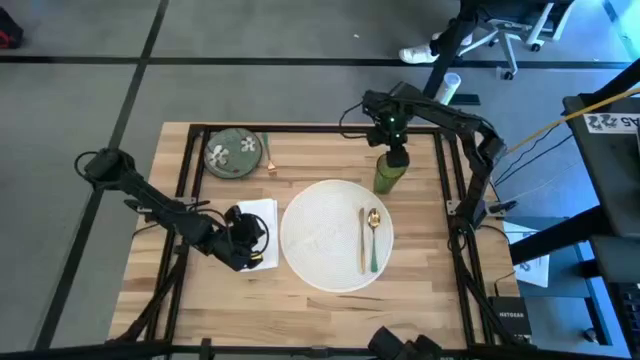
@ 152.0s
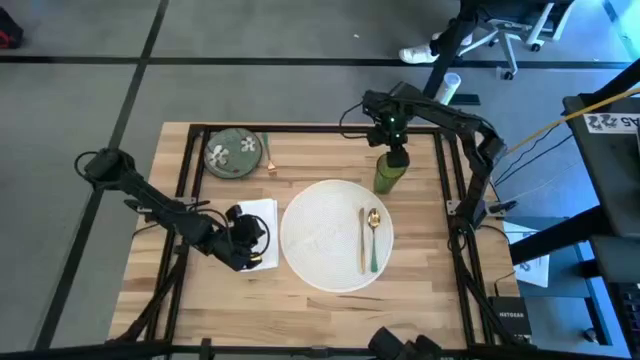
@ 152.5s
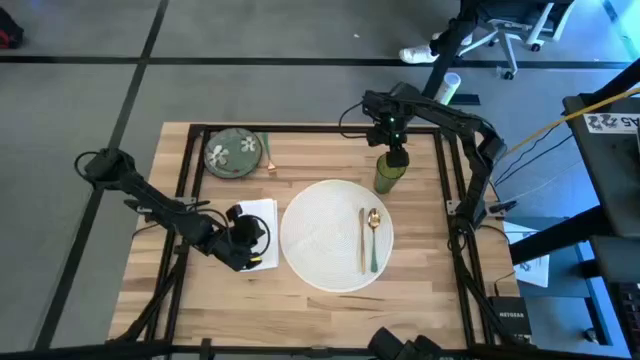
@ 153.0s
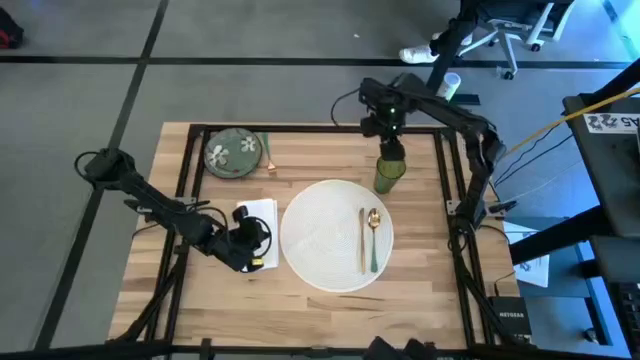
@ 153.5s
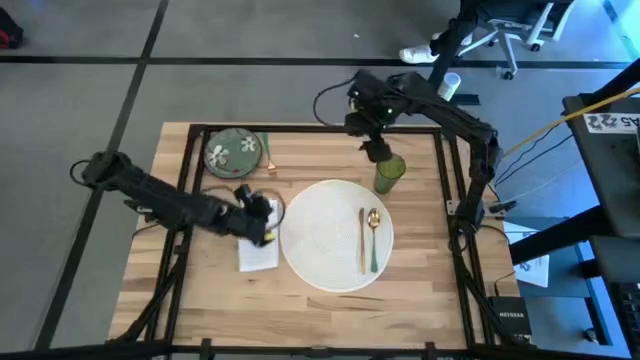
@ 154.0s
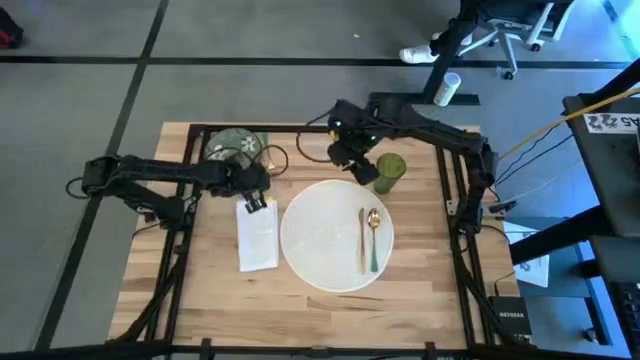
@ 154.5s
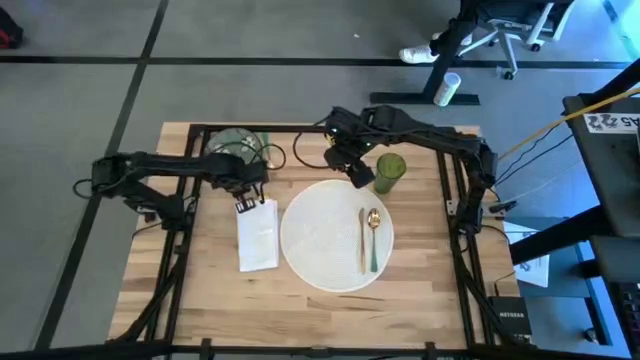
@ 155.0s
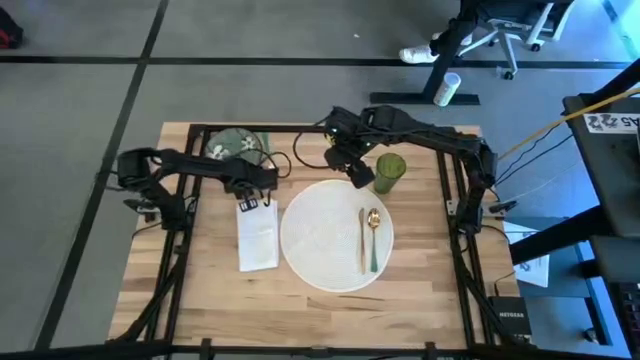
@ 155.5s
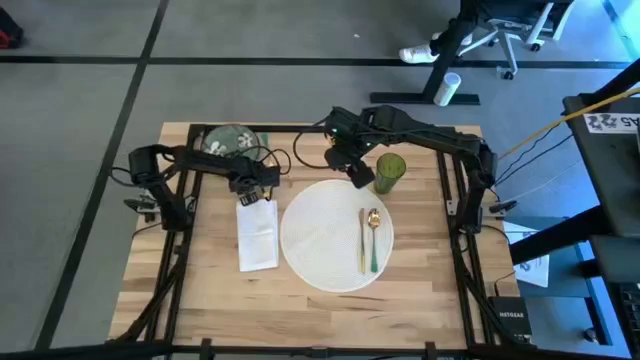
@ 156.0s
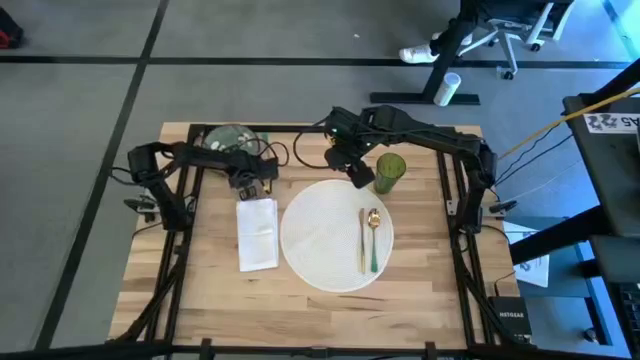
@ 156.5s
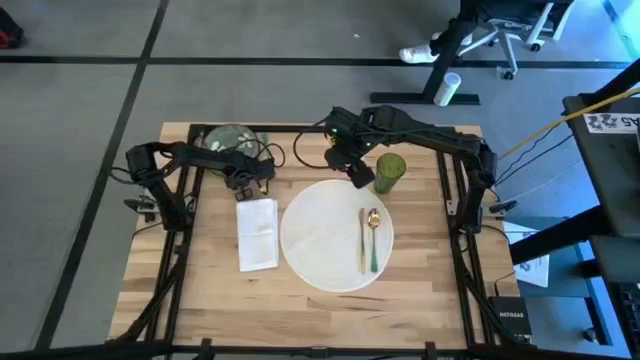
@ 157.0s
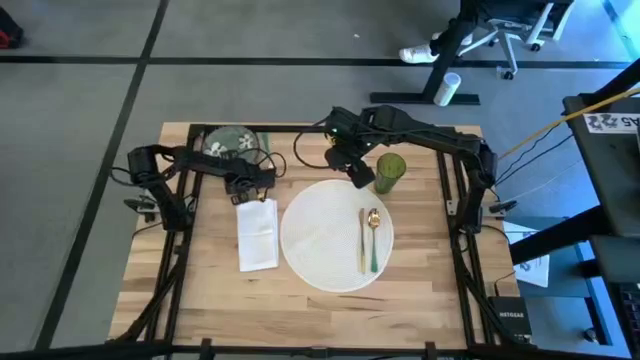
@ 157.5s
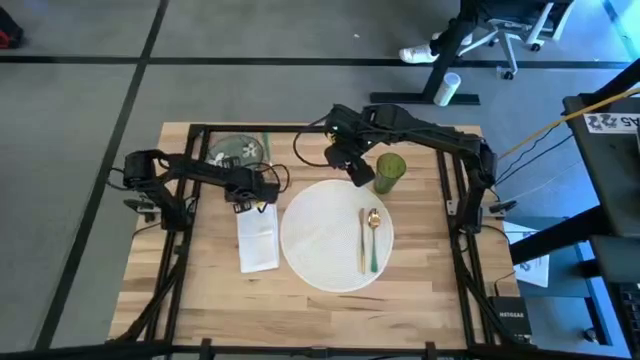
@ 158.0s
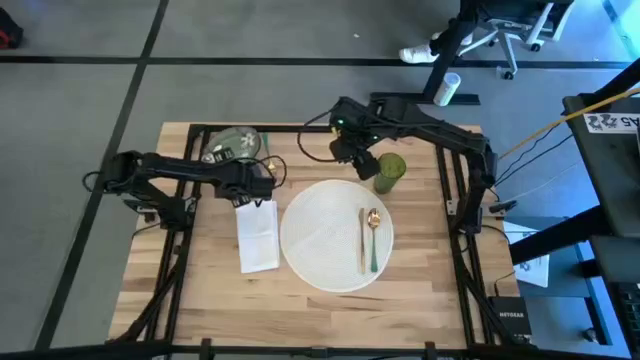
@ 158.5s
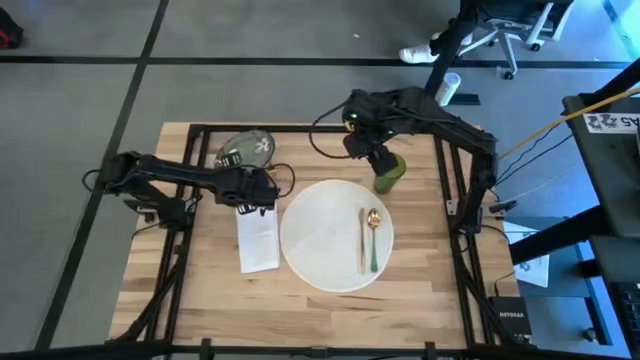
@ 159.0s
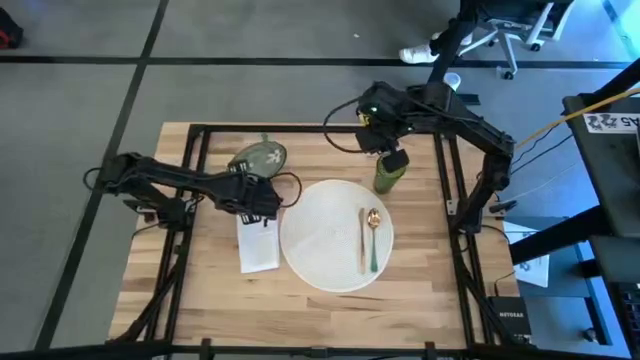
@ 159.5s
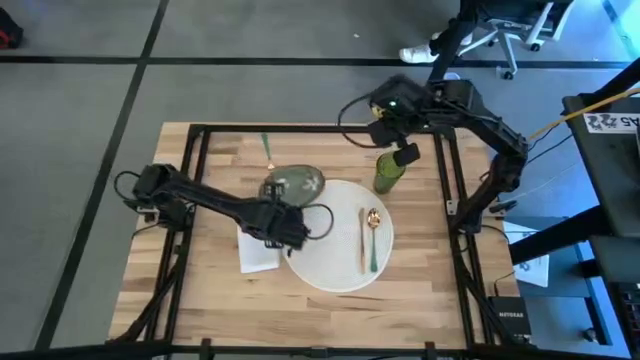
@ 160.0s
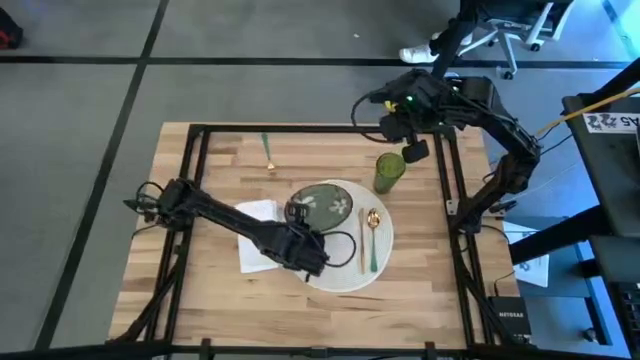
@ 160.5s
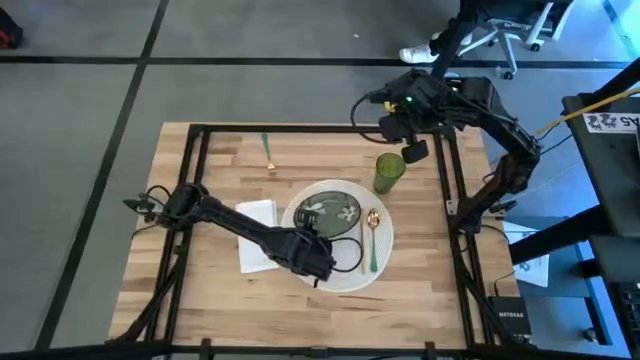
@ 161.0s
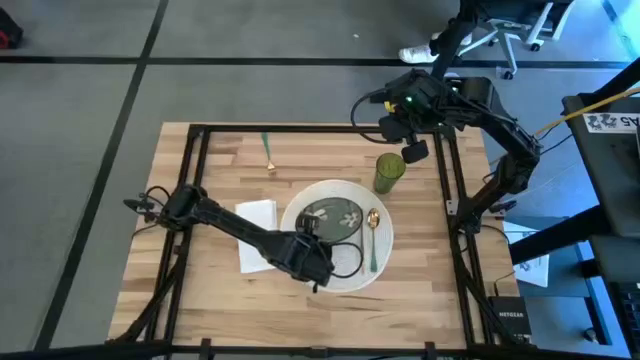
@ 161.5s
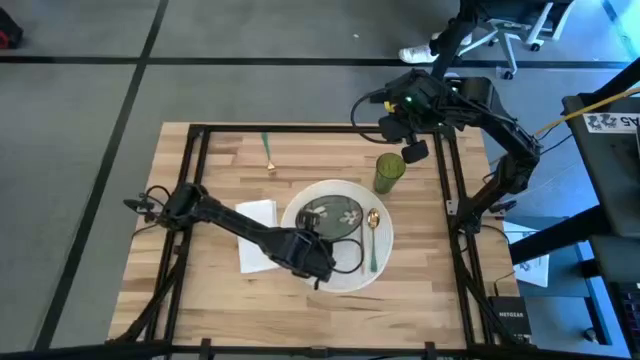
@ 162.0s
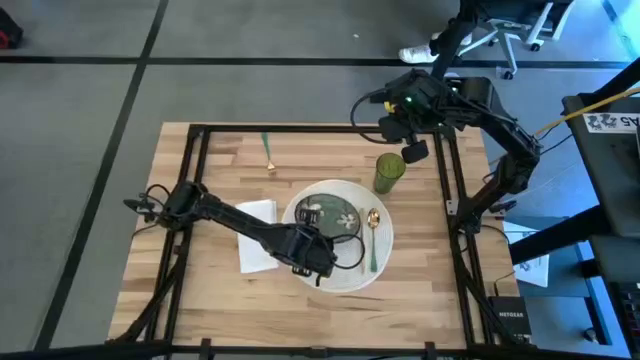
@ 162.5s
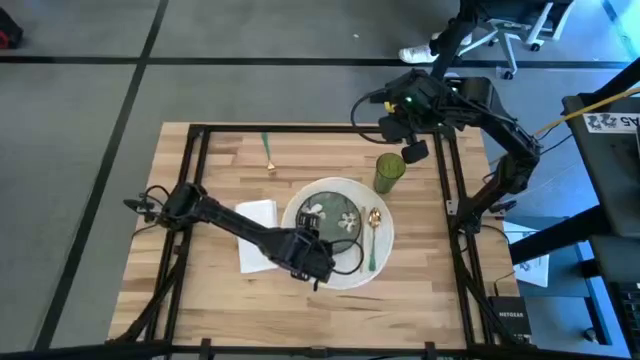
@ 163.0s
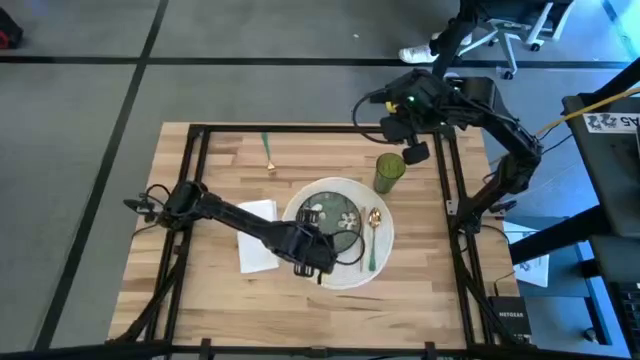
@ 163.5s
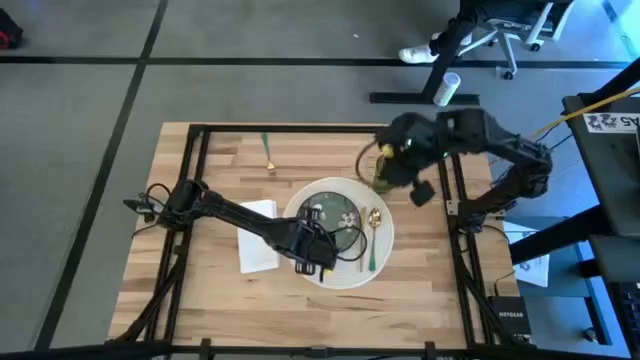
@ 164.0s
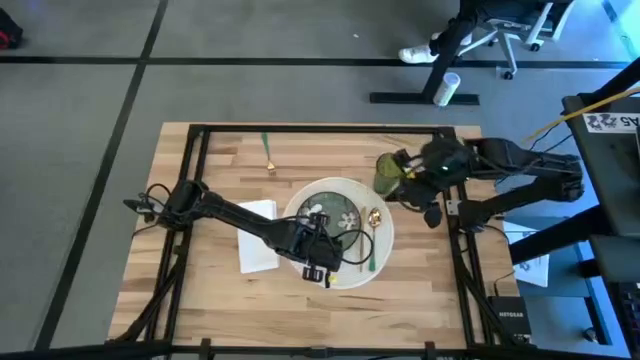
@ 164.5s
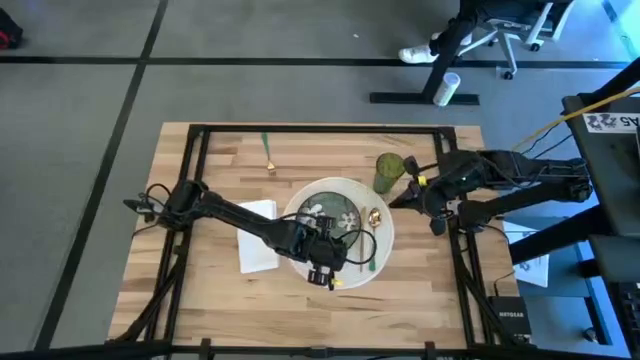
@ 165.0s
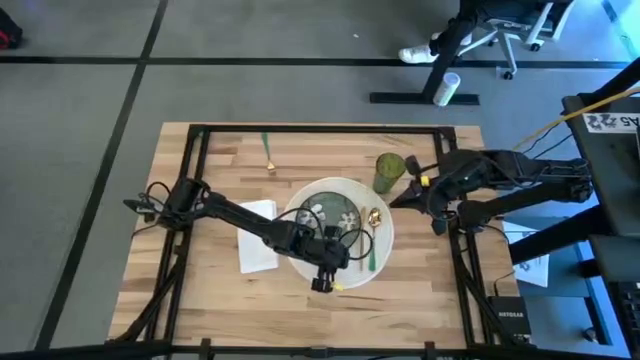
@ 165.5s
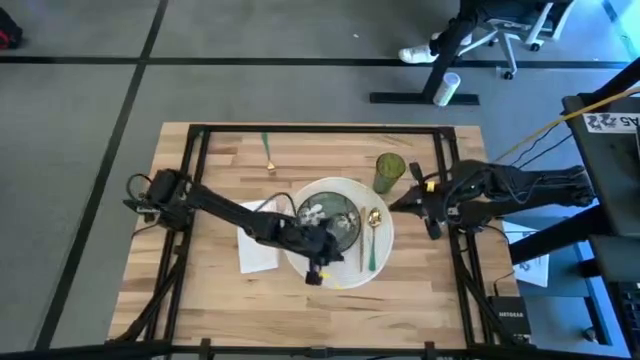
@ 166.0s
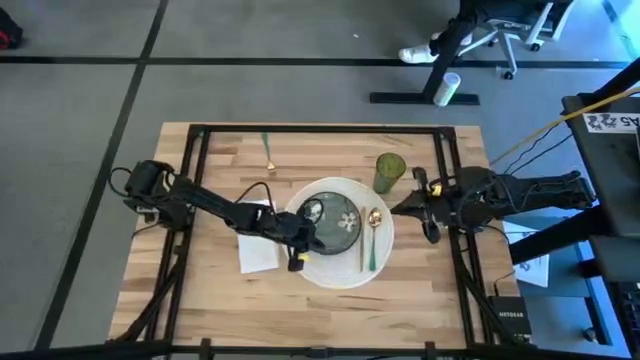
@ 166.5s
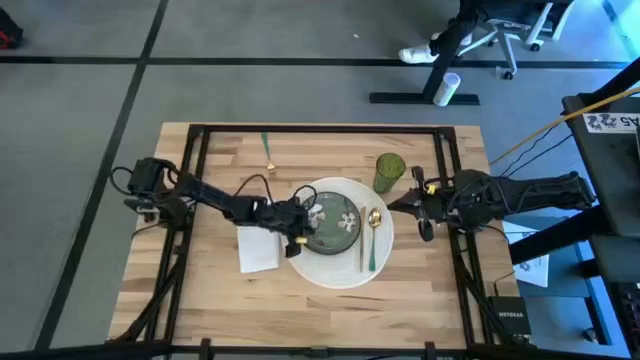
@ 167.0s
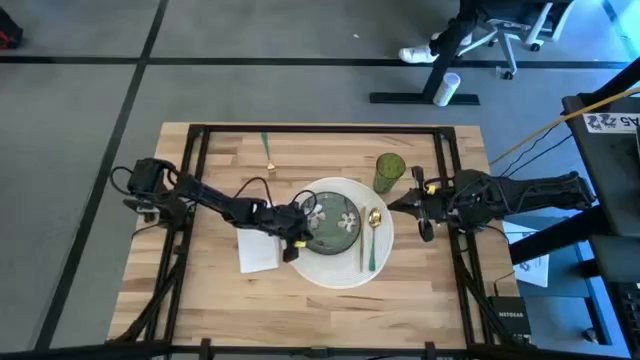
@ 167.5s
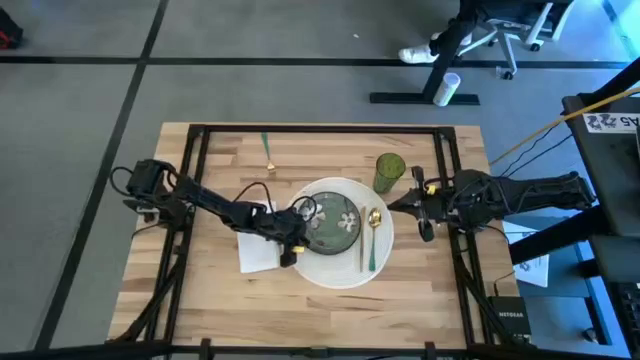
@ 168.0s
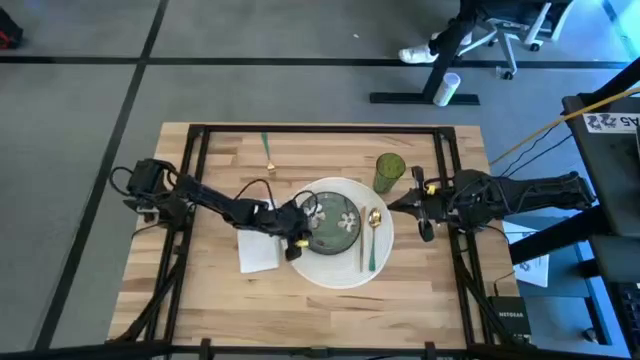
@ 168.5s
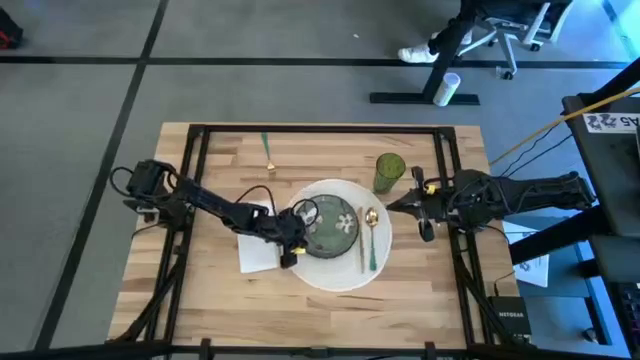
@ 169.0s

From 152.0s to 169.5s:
Task: Set table place
Put the green plate to the left side of the gold butter knife on the white table mat
